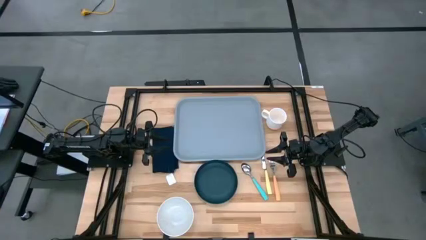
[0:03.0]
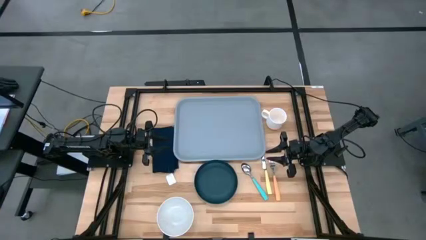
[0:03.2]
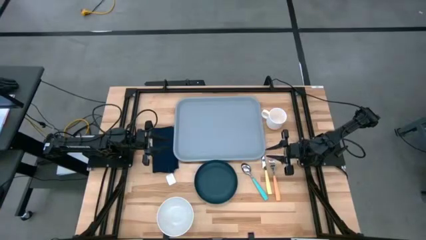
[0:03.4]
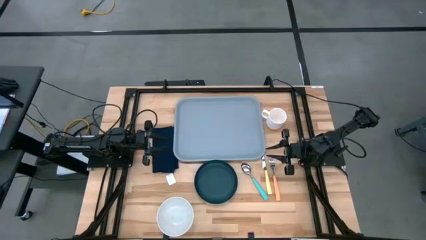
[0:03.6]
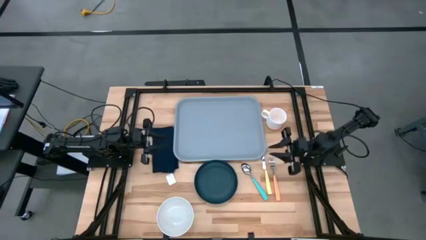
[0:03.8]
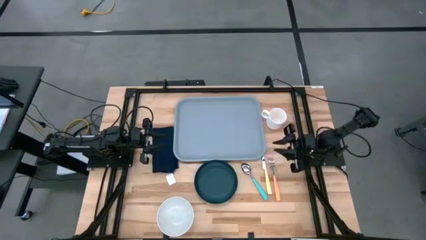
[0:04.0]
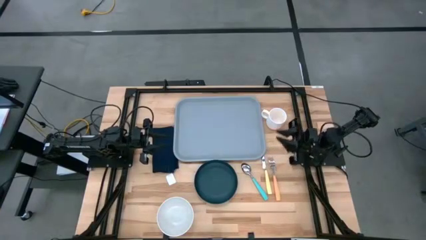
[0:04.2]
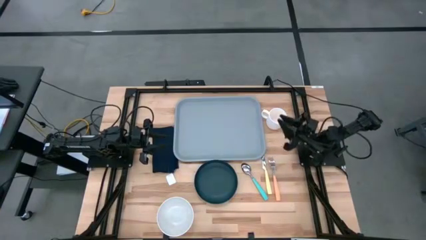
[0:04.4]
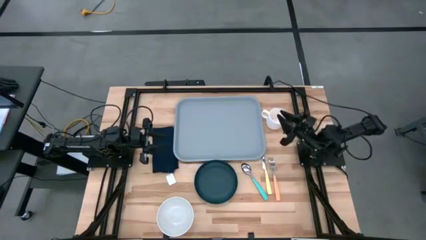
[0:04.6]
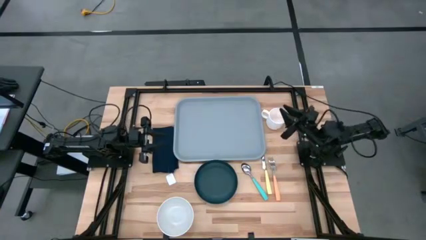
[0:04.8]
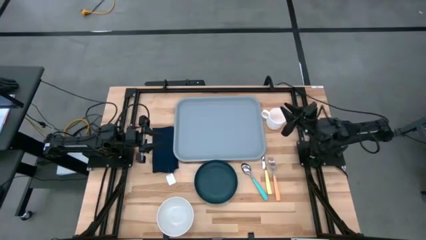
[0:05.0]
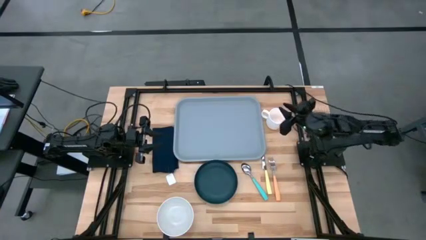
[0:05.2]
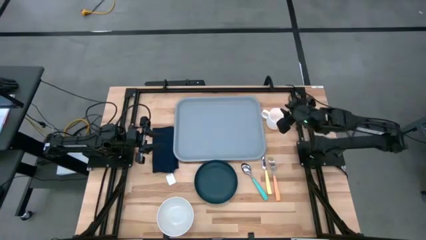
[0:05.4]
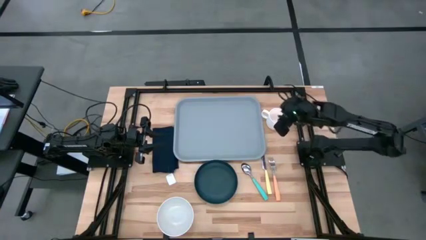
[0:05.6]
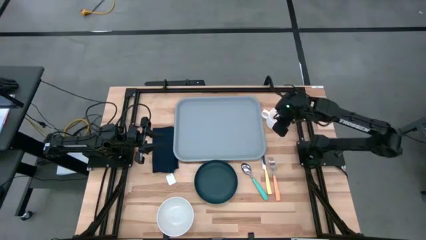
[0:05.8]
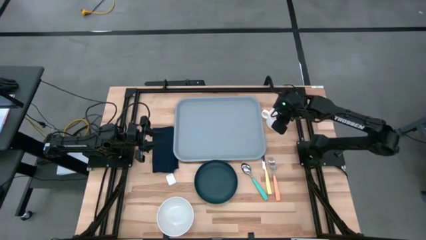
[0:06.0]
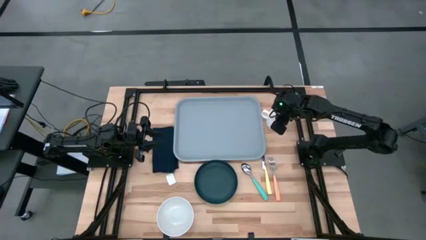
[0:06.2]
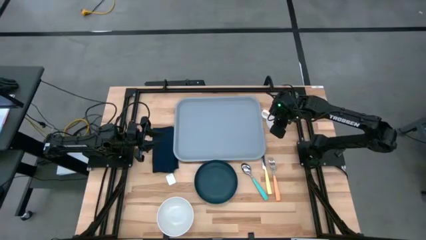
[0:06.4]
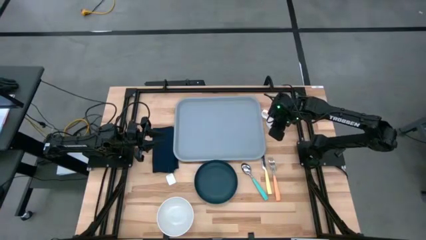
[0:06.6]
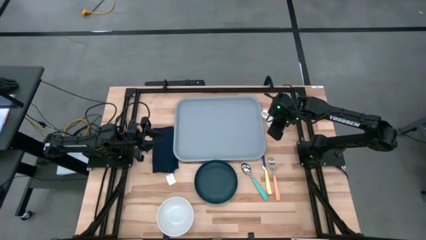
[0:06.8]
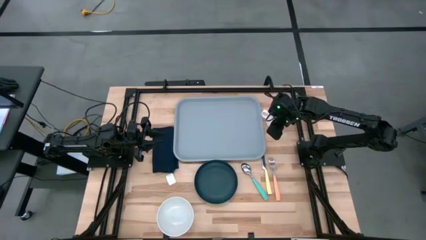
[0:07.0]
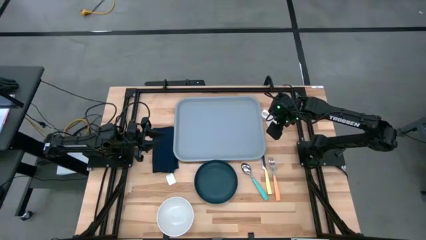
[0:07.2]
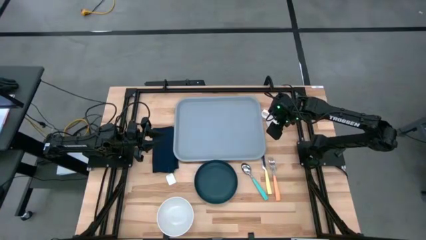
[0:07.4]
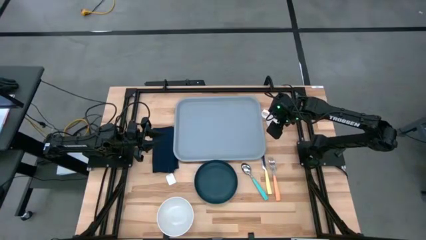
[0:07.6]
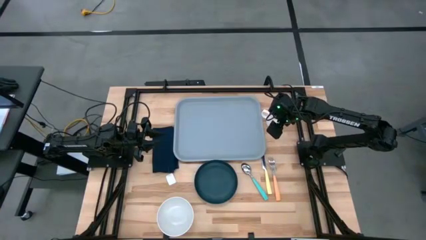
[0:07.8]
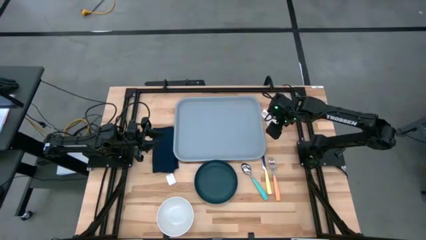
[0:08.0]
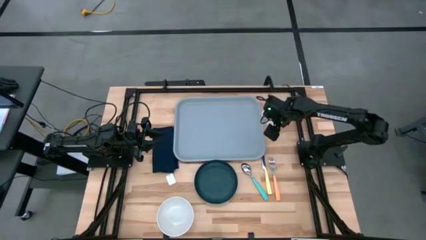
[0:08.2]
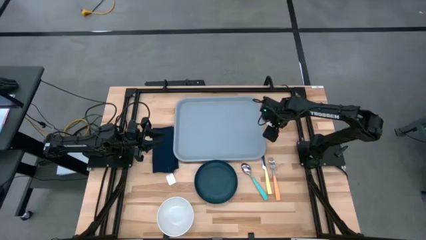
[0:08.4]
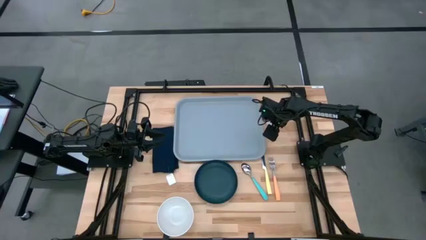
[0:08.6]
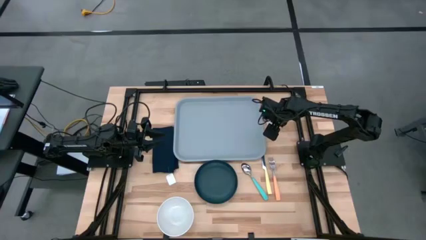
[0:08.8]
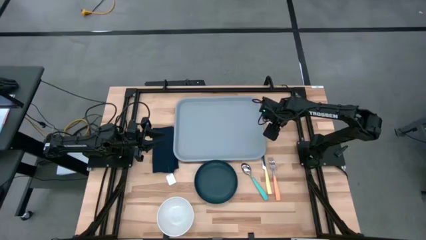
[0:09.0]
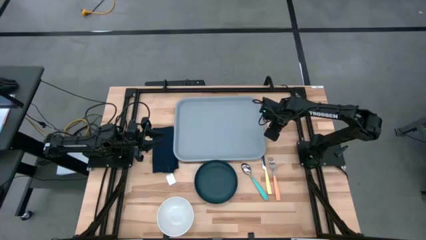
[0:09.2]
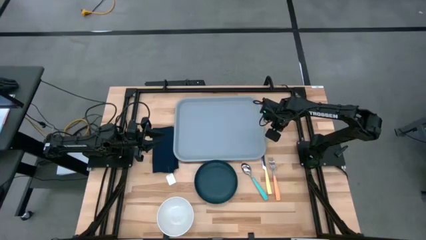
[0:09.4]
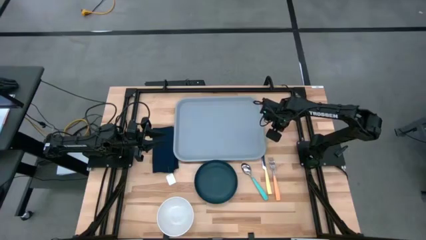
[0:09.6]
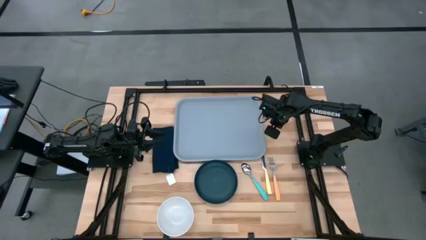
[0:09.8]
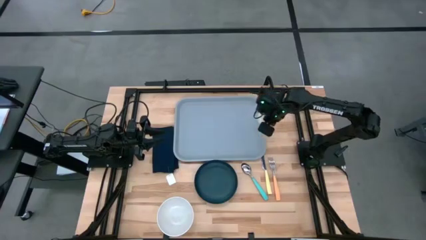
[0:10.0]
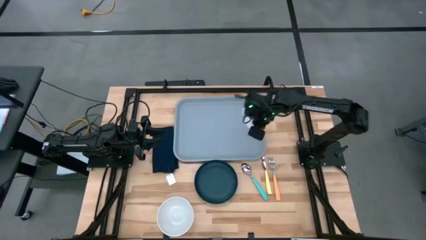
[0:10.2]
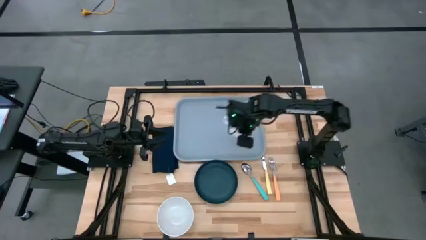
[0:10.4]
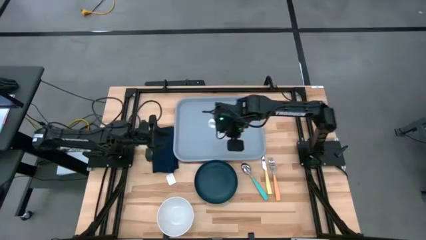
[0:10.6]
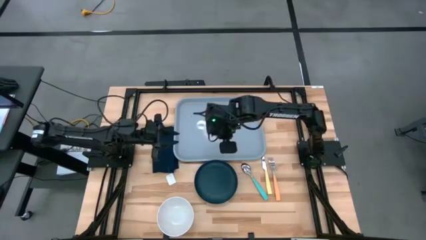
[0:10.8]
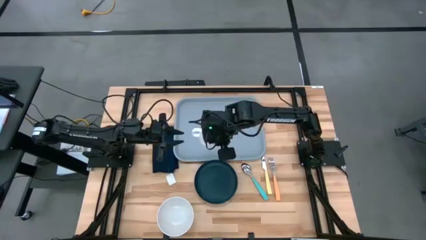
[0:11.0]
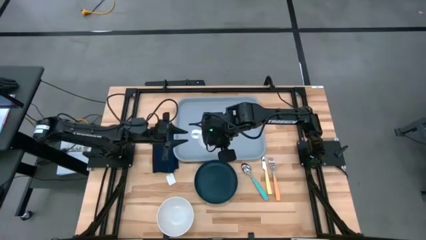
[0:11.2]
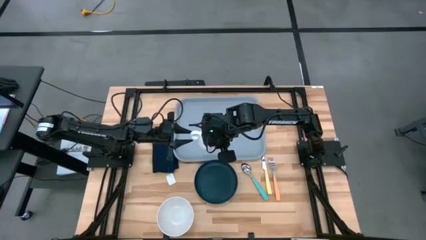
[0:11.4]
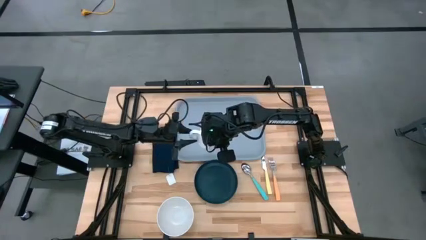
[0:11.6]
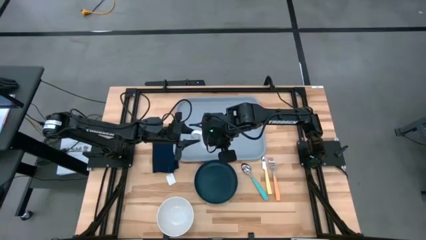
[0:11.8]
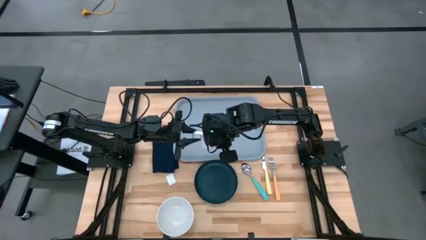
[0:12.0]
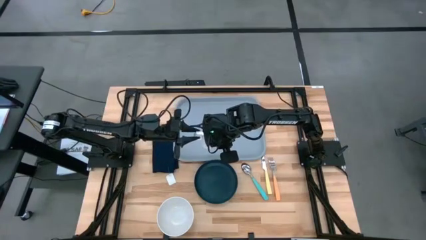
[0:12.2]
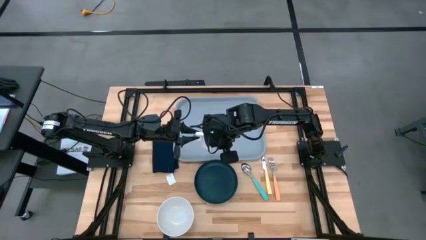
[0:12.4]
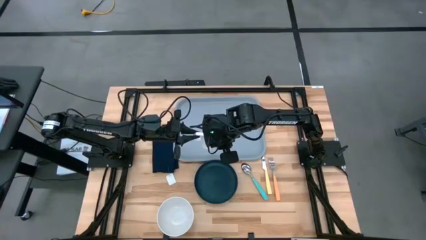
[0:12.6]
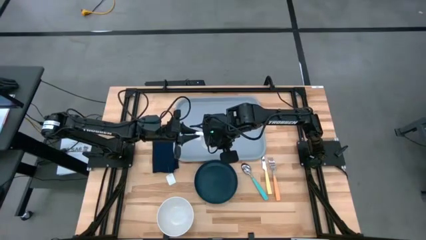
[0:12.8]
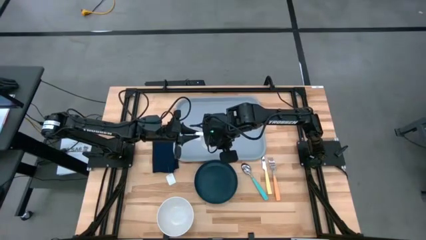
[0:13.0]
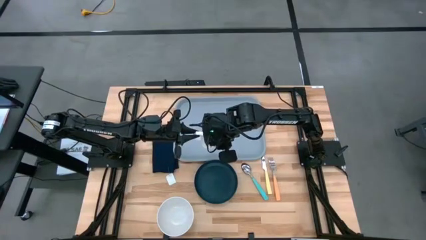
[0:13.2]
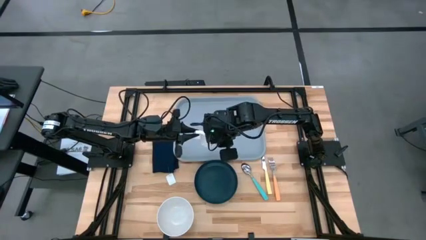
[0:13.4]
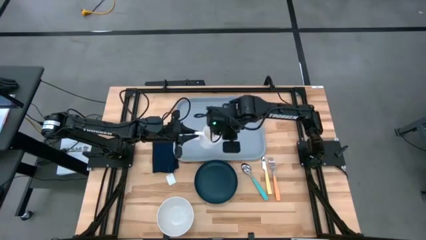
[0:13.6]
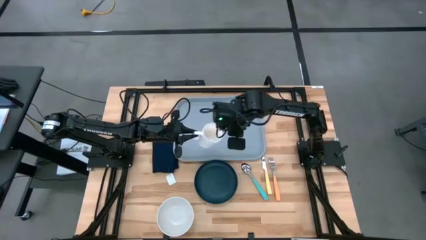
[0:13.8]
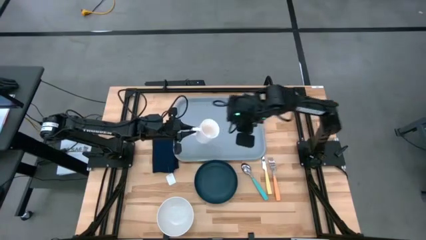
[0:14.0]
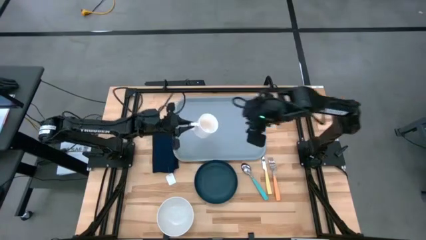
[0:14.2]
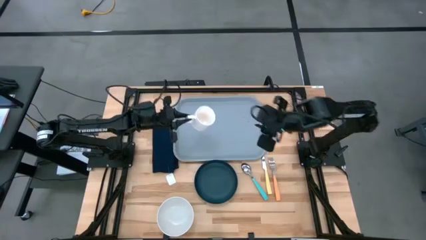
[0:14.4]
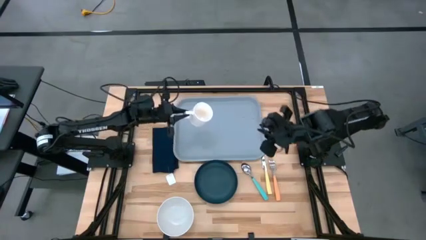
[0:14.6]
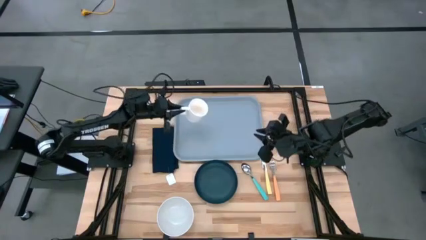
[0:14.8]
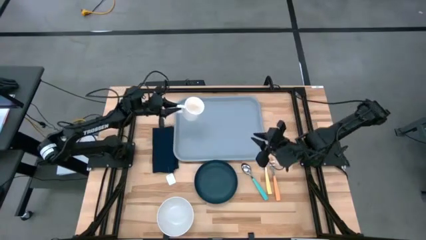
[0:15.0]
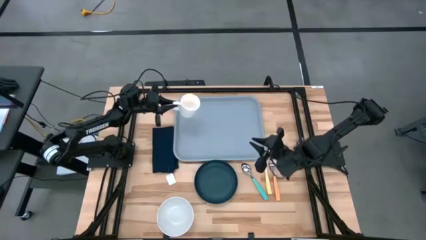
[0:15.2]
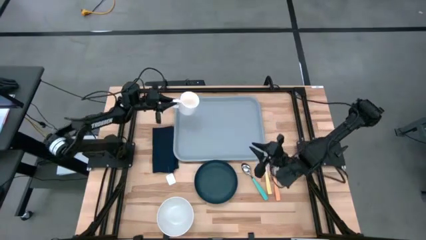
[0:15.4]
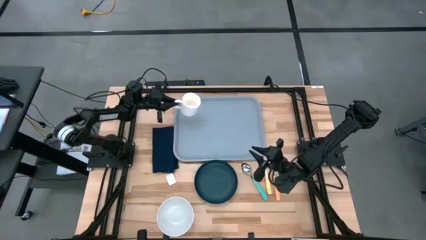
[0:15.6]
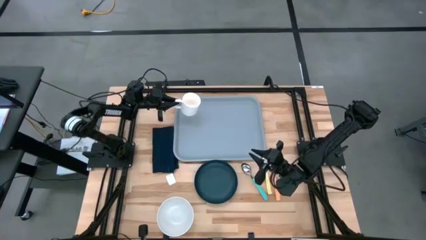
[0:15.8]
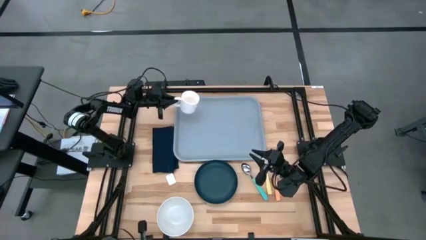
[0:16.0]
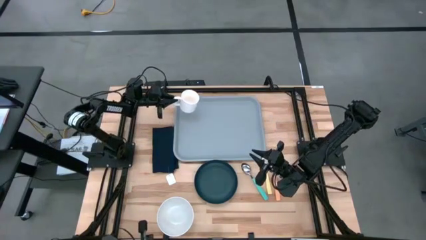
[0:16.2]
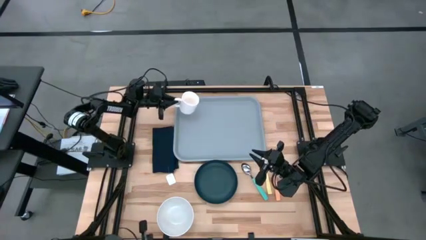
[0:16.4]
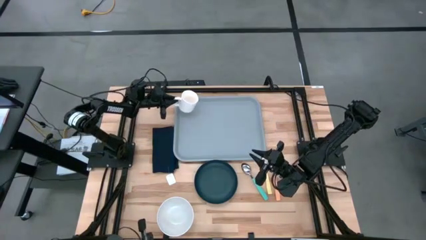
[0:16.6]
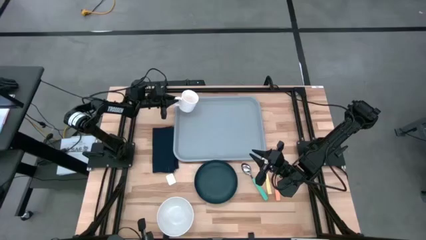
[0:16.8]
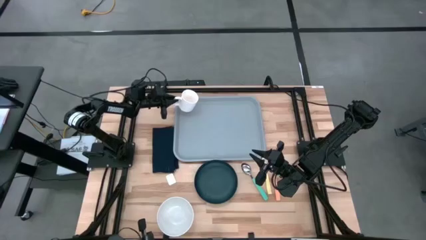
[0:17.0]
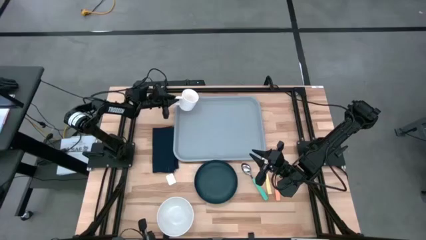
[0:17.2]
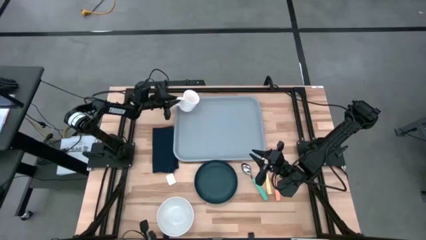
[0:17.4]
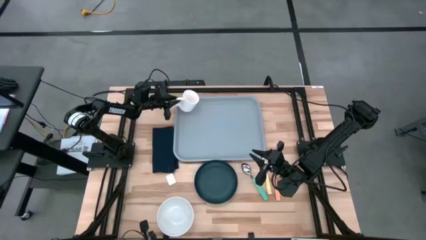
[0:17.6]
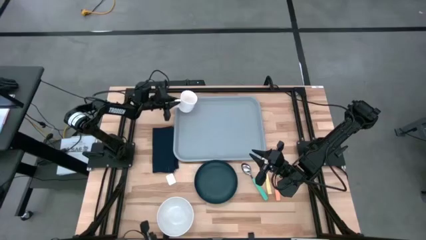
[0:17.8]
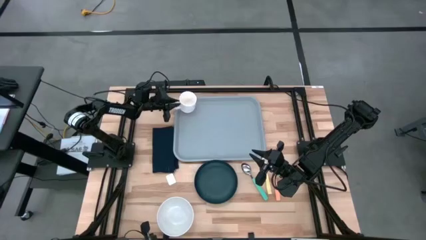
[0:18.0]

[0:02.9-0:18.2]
Task: Set up tray
Put the white mug on the gray serving tray

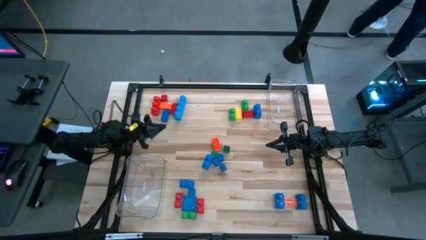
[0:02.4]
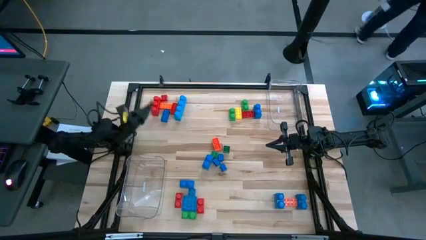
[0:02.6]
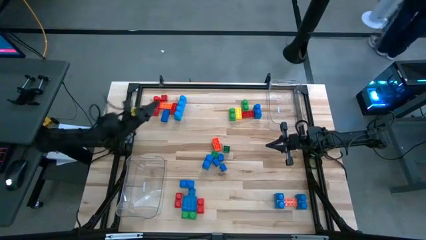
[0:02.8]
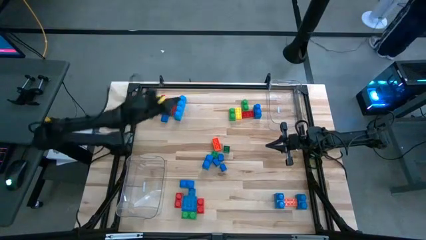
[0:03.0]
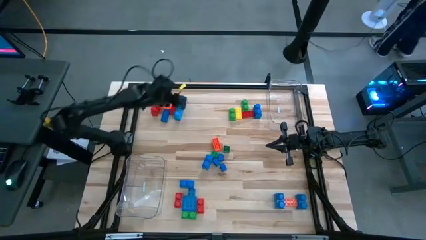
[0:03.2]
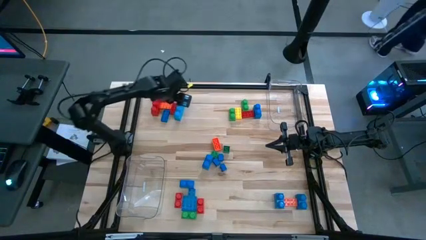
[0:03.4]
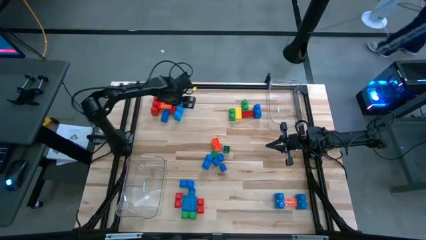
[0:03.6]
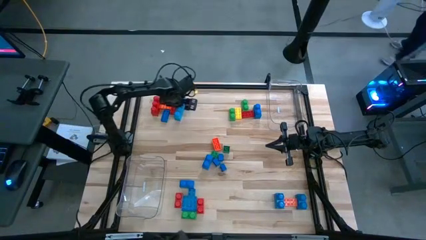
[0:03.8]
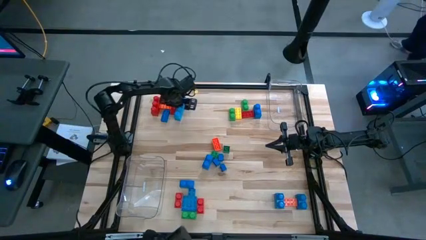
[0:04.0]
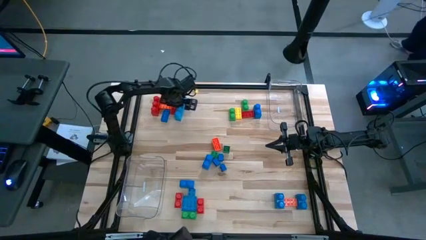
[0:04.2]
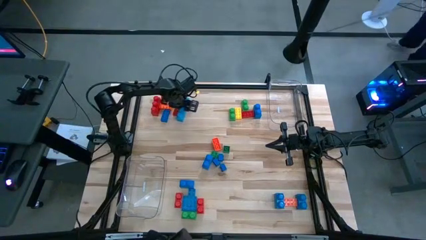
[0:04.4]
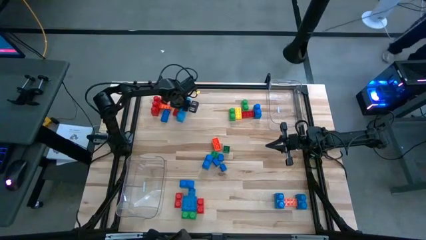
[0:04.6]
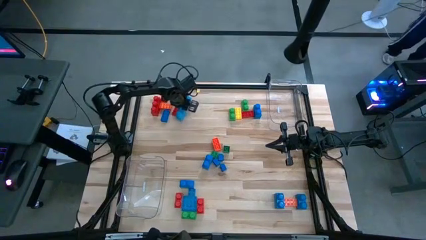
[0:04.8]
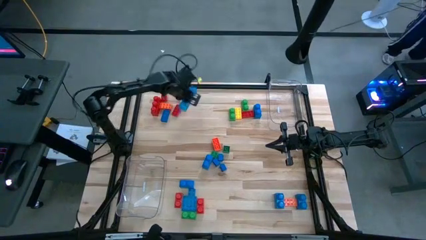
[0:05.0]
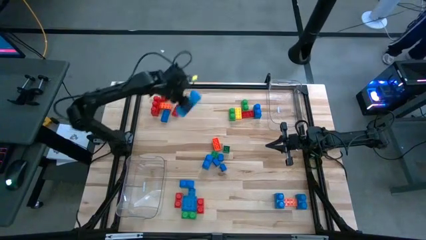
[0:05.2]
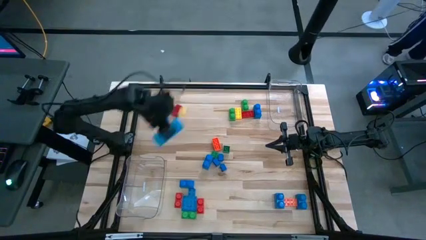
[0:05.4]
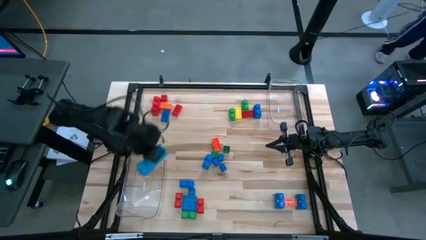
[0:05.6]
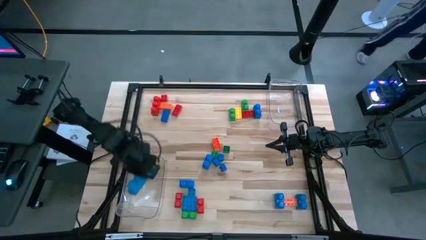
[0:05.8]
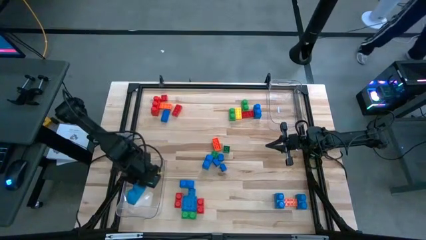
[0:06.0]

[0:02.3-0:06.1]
Task: Sort blocks by size
Put the large blue game piece into the bottom transparent bin
